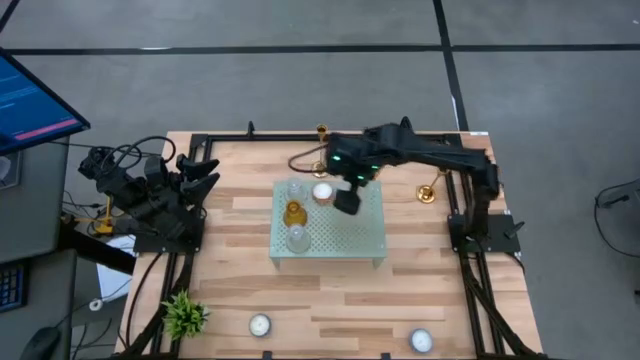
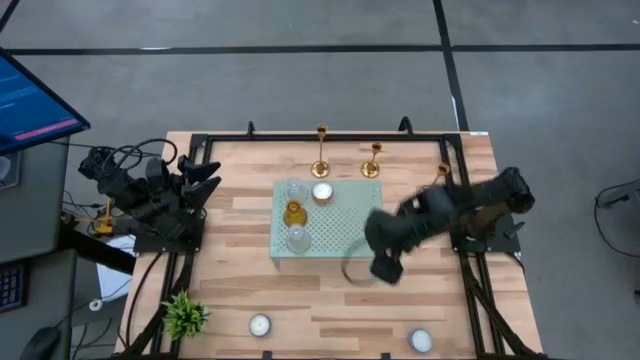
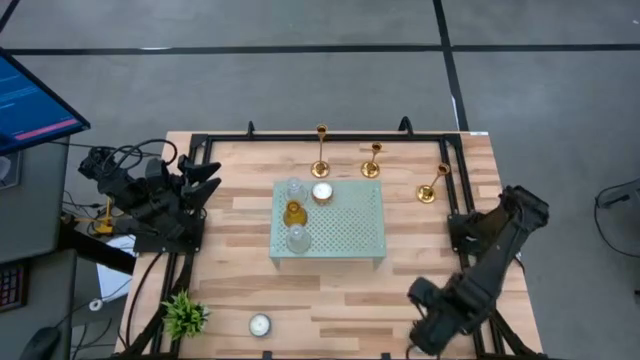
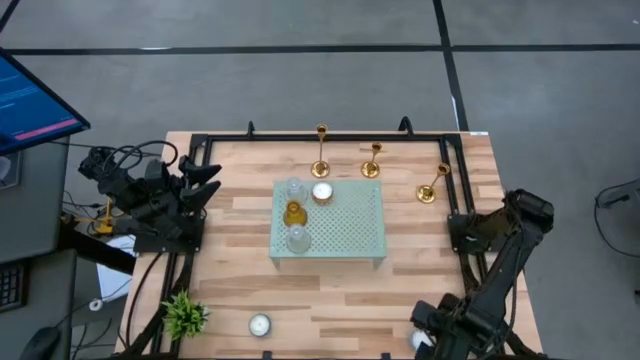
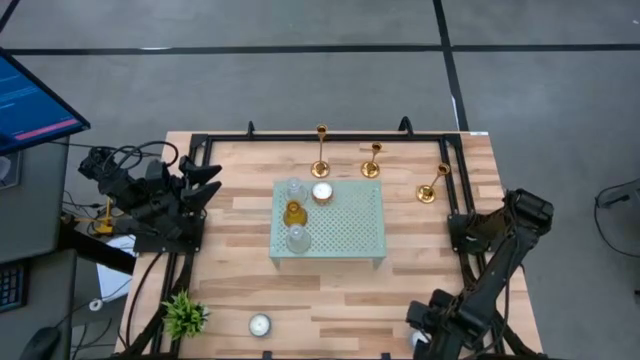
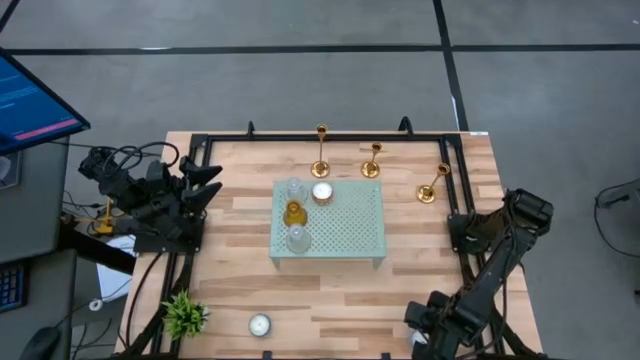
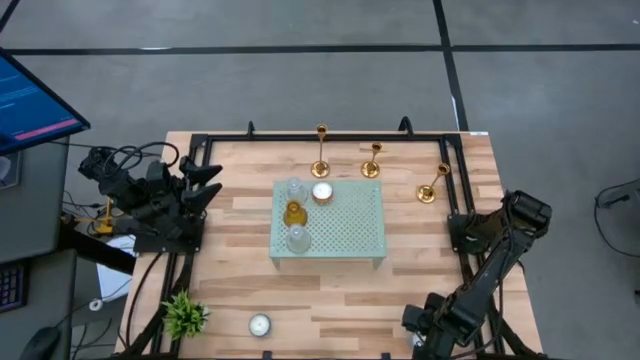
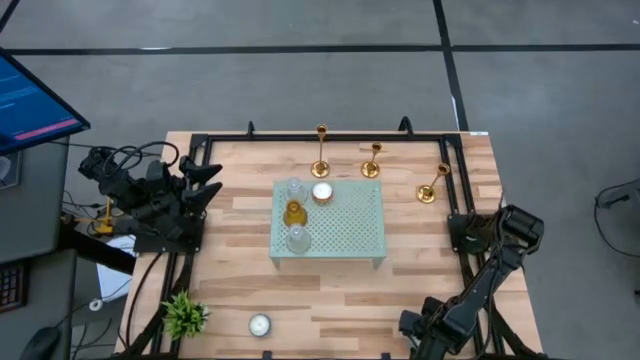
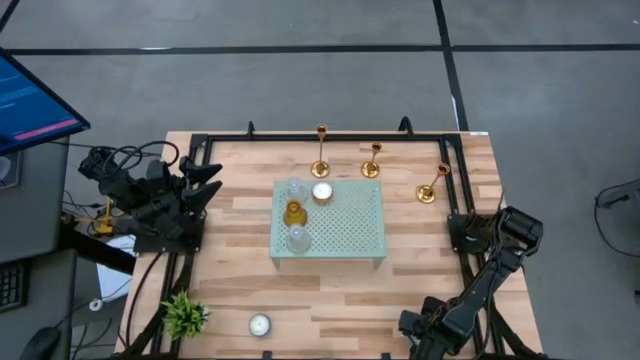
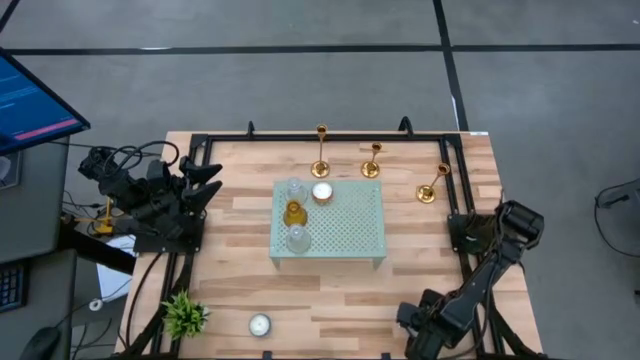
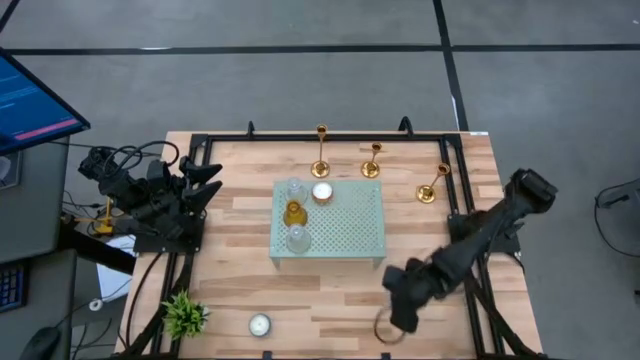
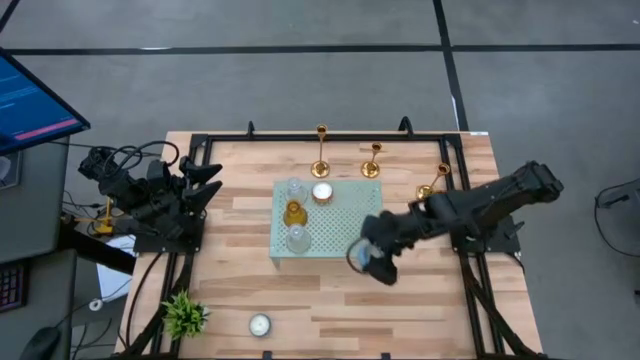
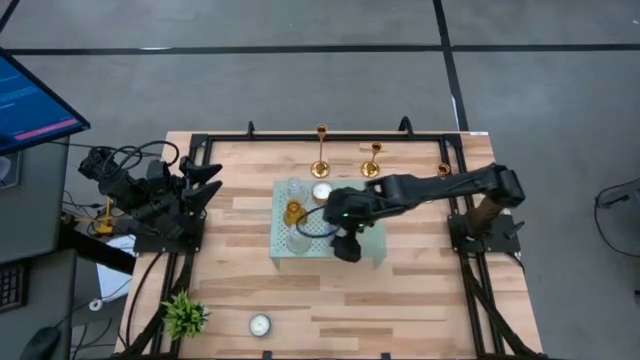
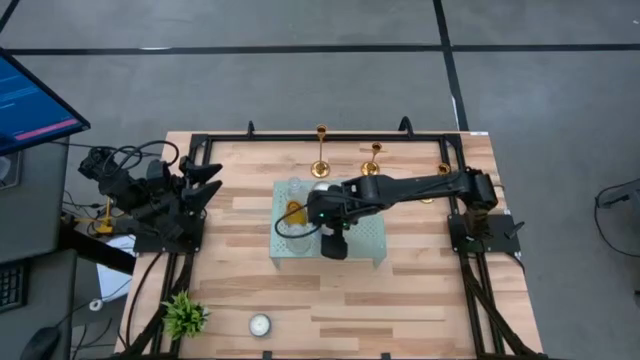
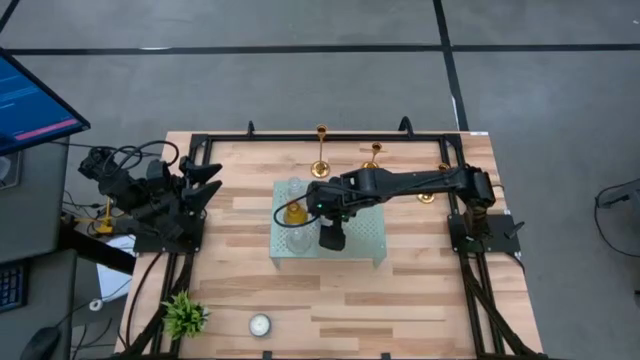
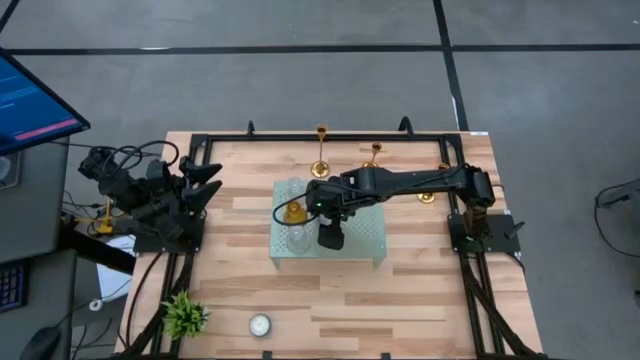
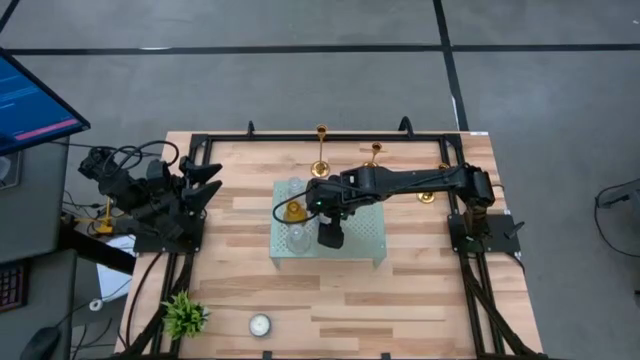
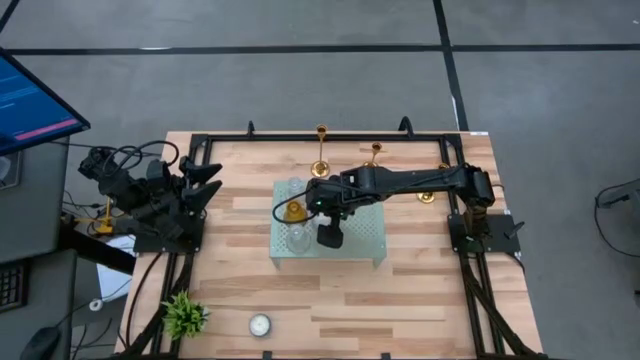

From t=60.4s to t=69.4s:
Task: Pick & Place candle stick holders
Put the right blue scented candle on the shelf

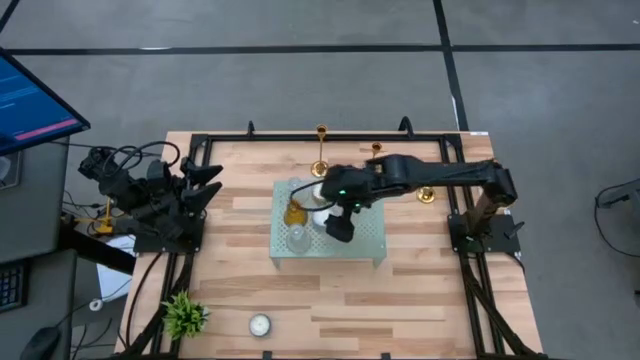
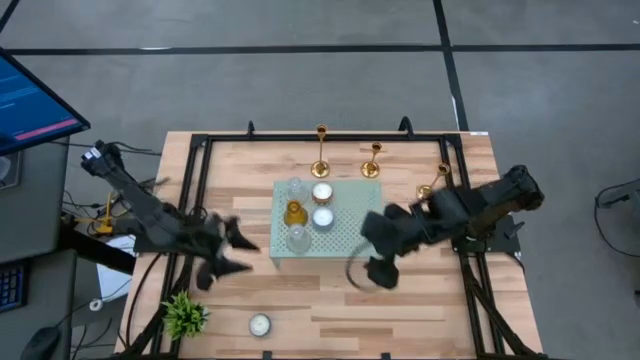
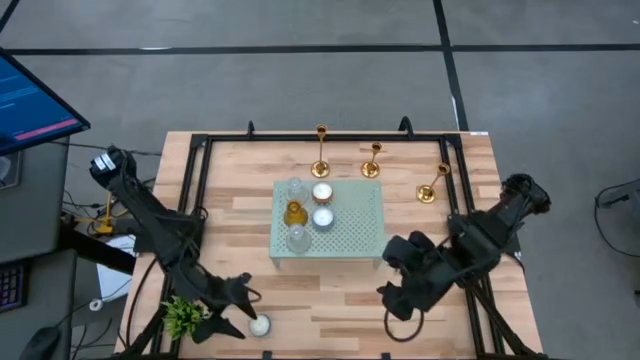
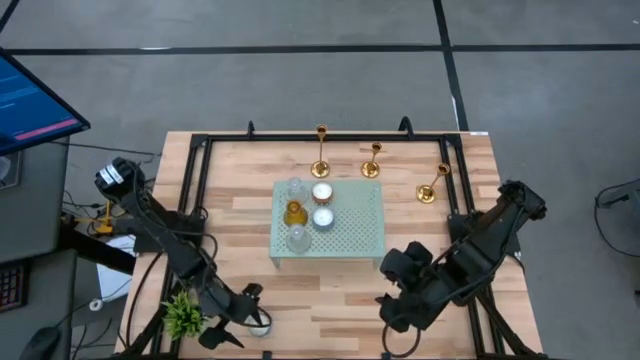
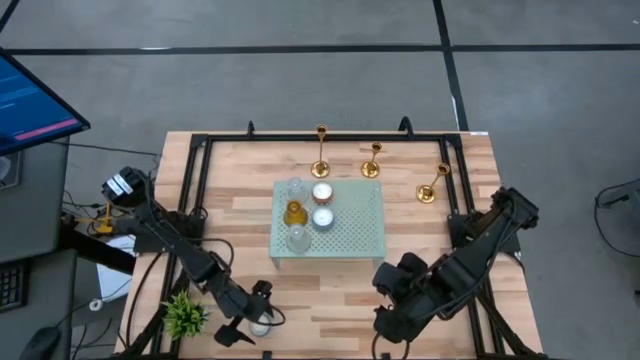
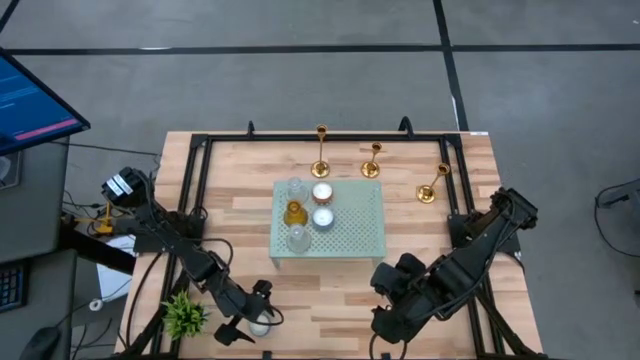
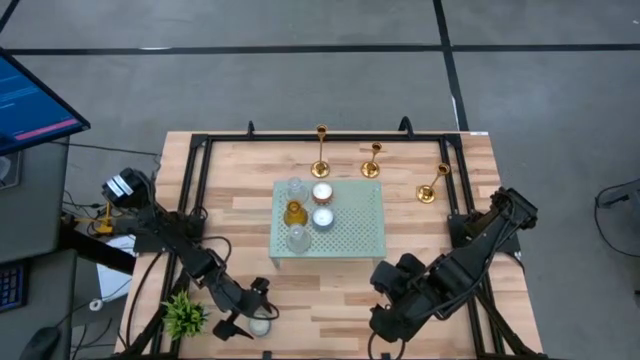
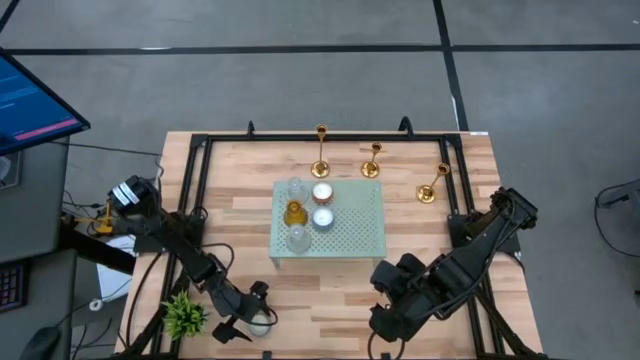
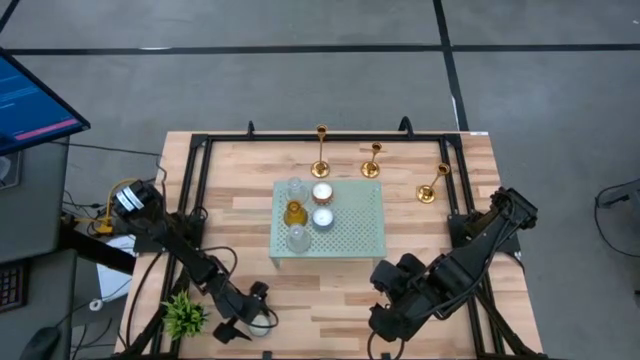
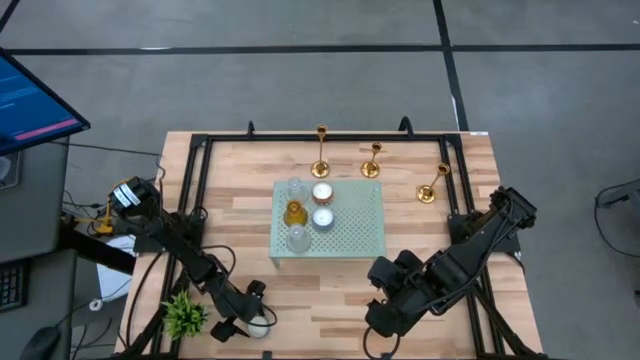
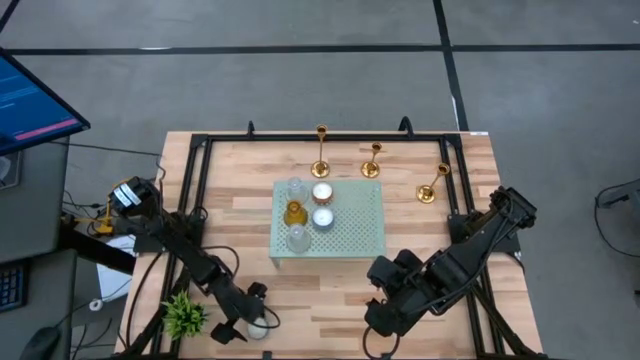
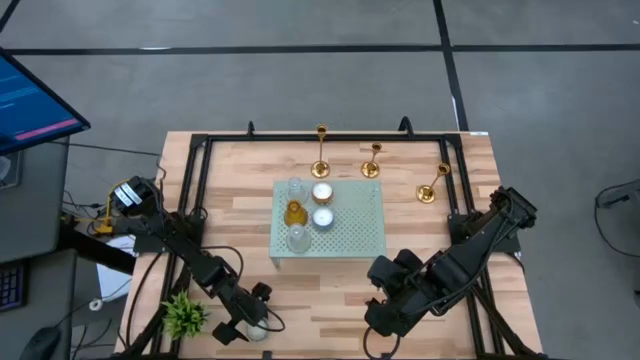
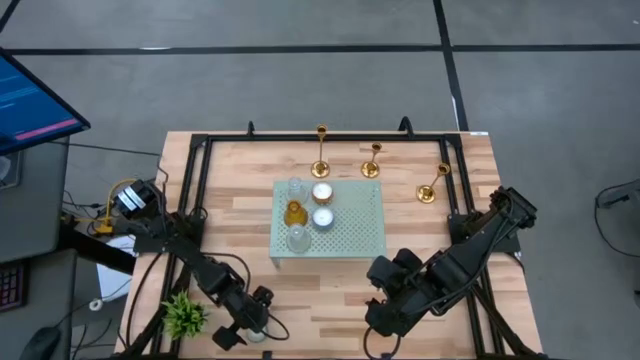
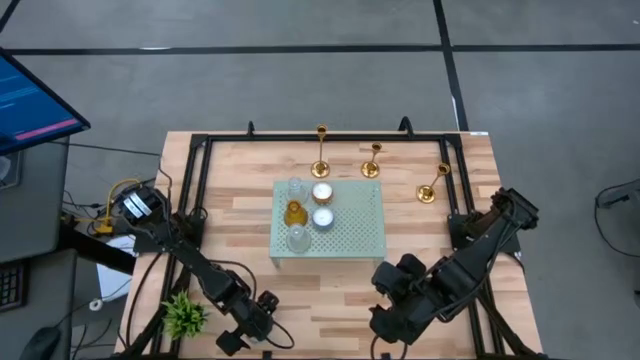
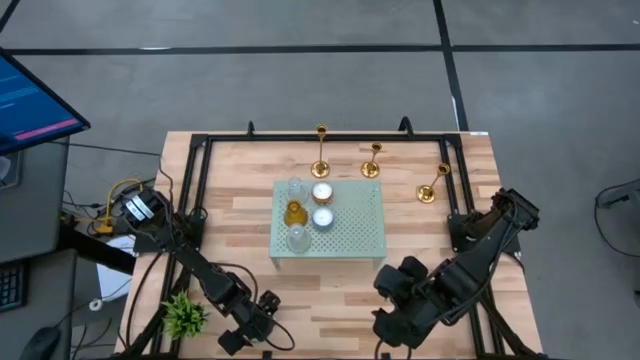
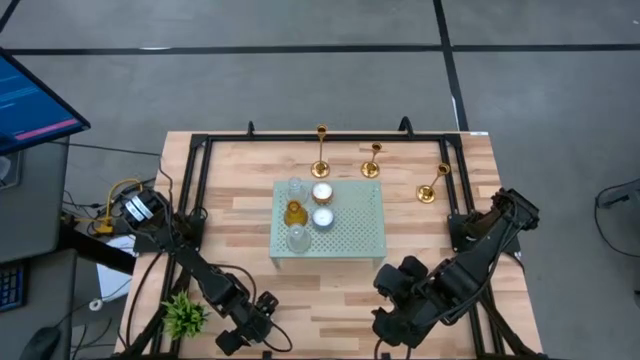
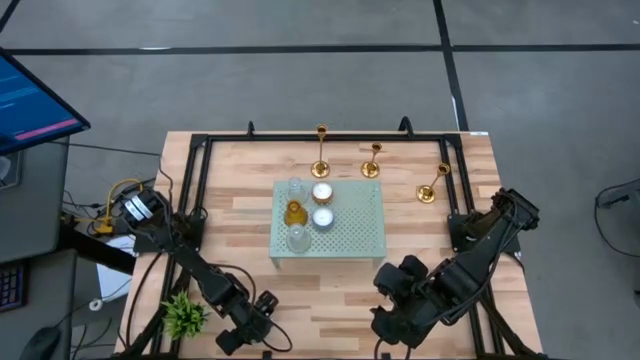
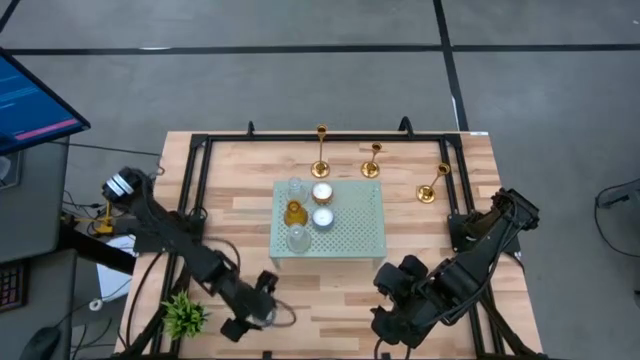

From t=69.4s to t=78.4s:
Align the blue scented candle with the other blue scented candle on the shelf

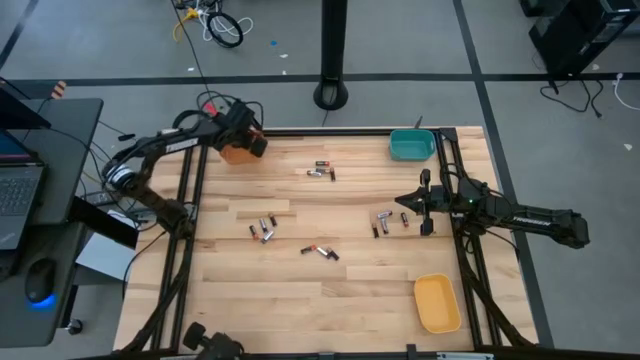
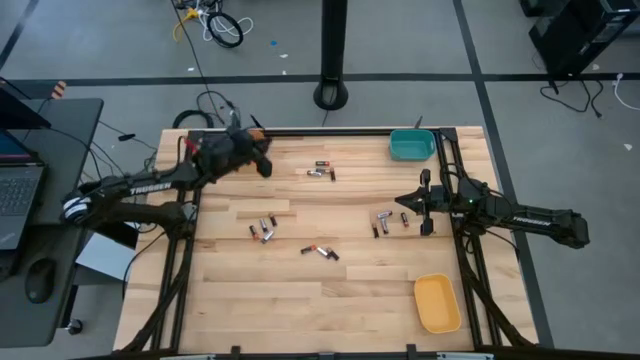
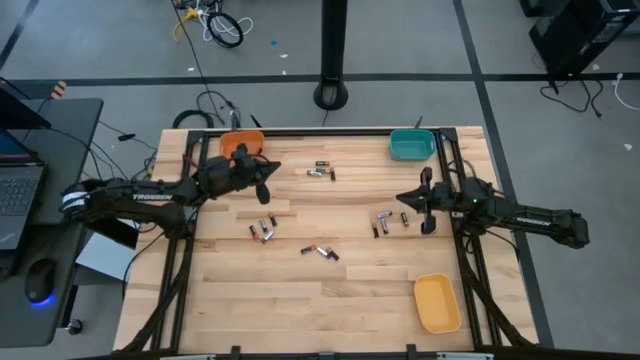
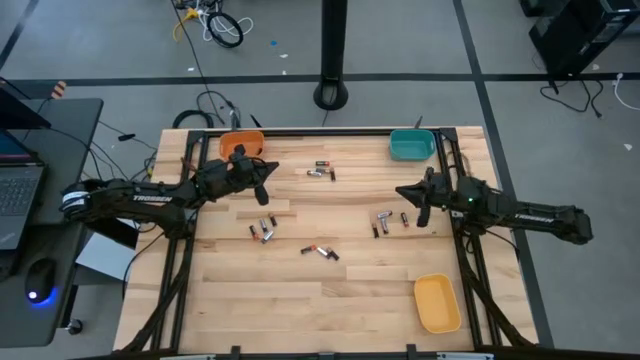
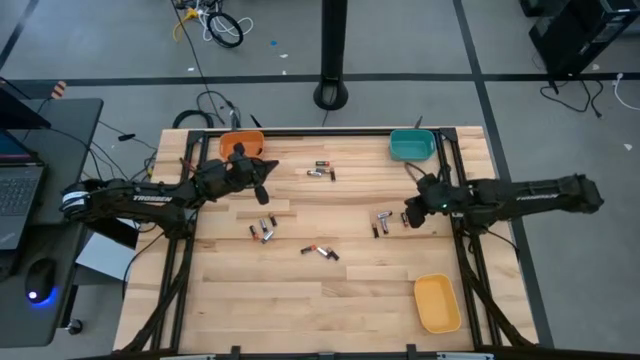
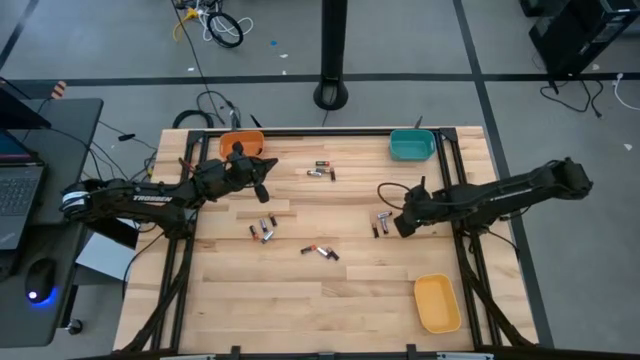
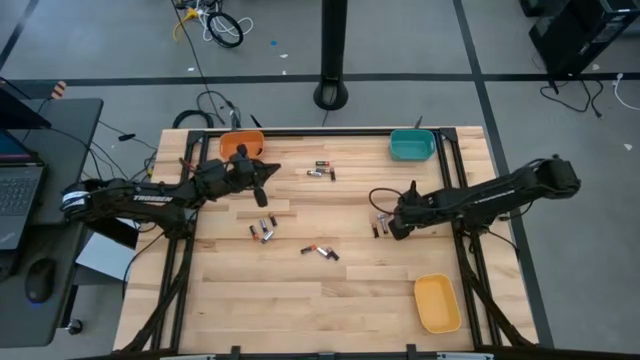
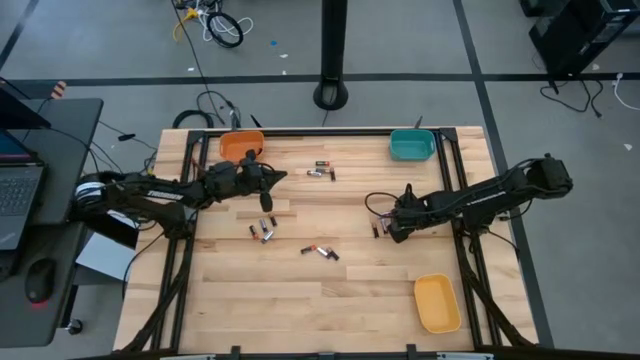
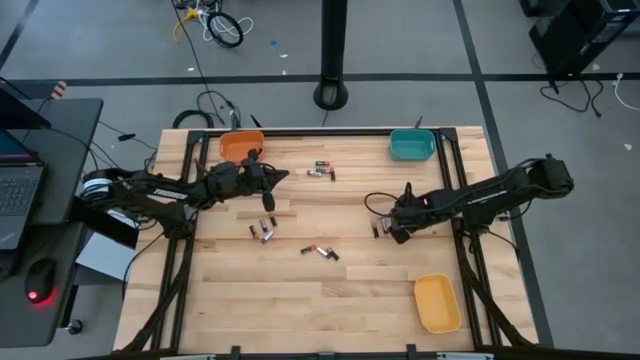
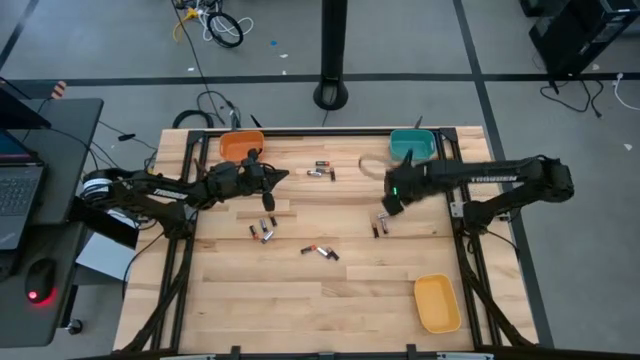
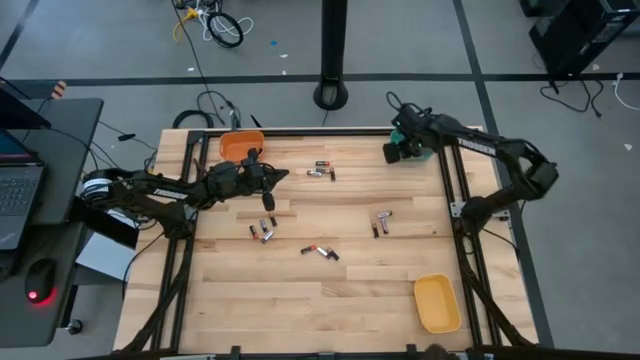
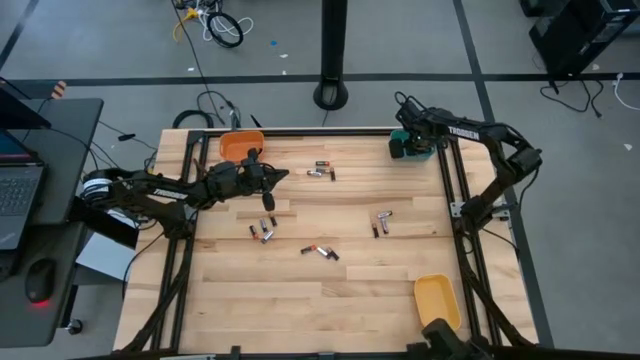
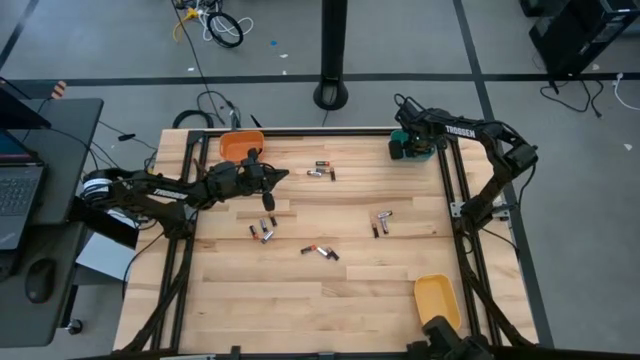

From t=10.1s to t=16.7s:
Task: Sort batteries
Put the black-red battery into the blue bin
